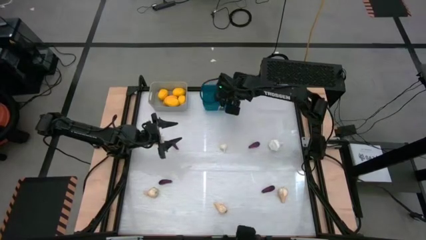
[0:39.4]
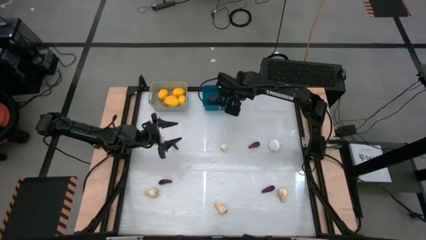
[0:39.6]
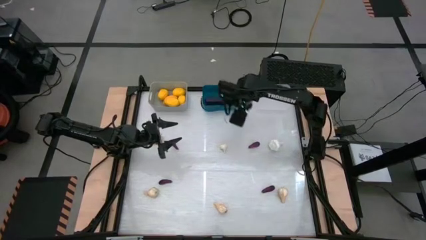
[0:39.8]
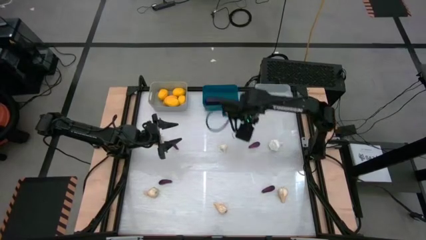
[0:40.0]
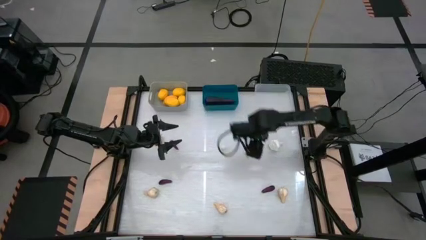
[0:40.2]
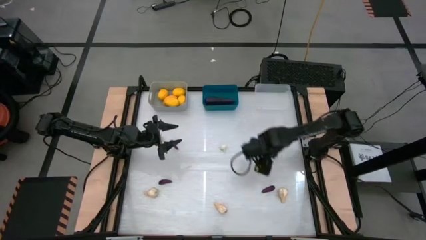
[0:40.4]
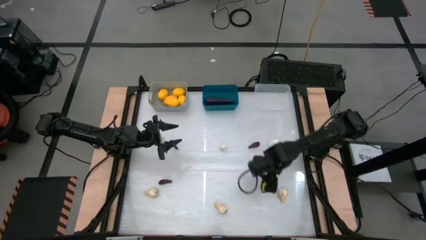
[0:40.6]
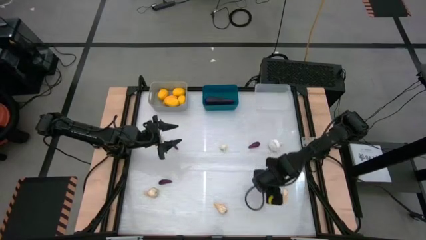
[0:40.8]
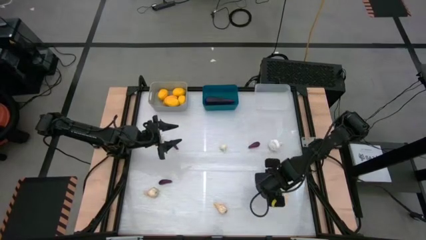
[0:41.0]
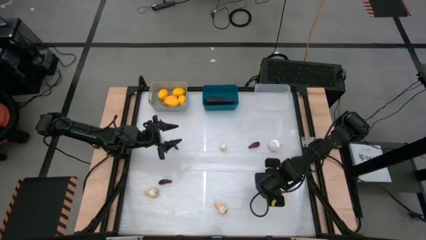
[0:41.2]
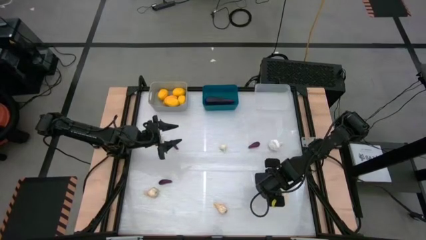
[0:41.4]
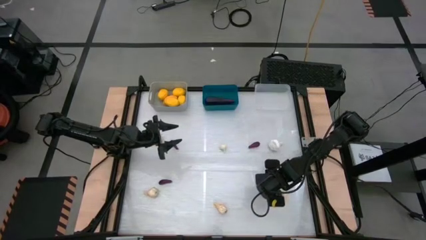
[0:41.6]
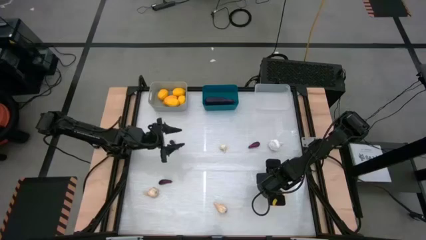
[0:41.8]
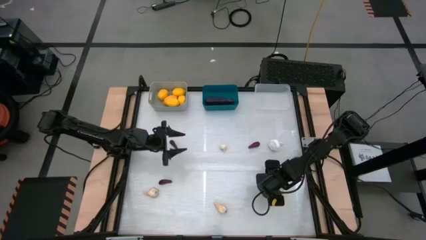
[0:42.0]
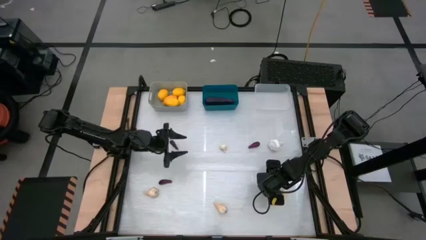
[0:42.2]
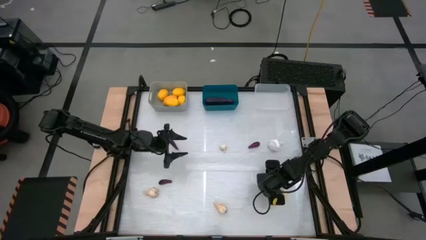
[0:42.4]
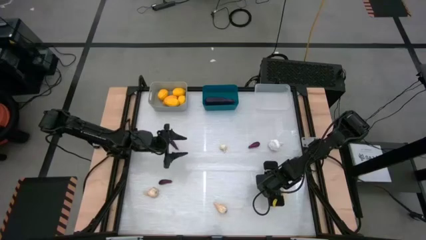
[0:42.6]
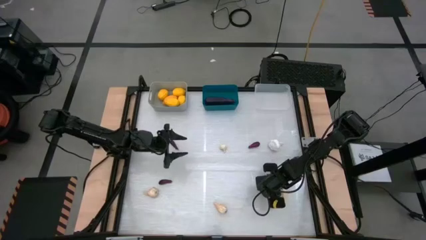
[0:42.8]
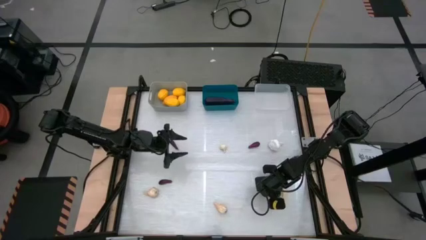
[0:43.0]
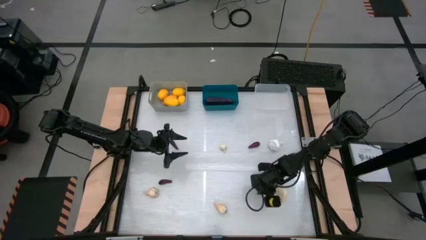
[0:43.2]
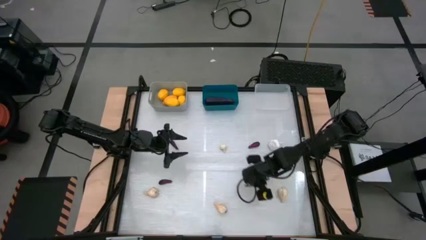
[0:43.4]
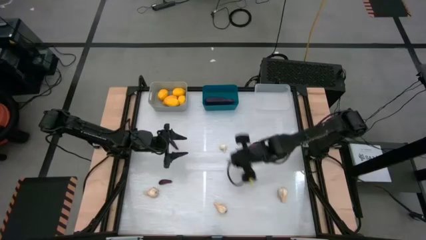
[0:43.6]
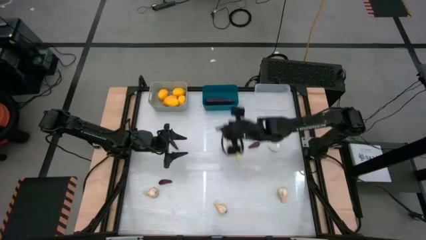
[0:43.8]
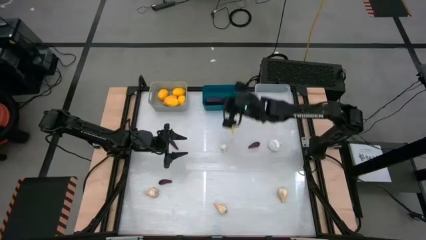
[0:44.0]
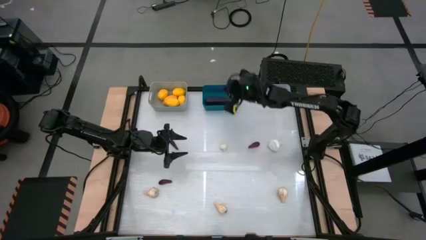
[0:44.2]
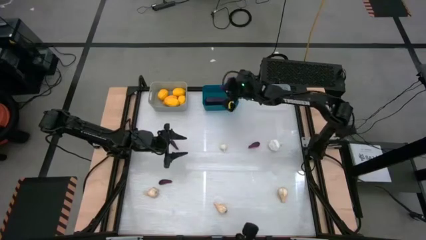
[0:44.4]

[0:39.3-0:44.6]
Task: Sort produce into baskets
Put the bottom right eggplant into the blue bin

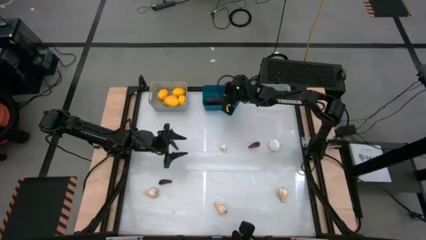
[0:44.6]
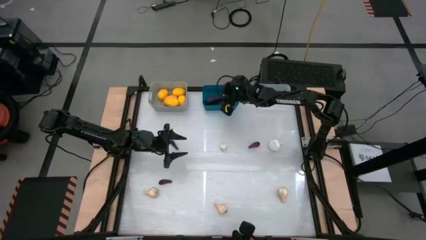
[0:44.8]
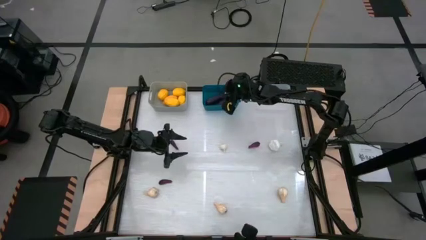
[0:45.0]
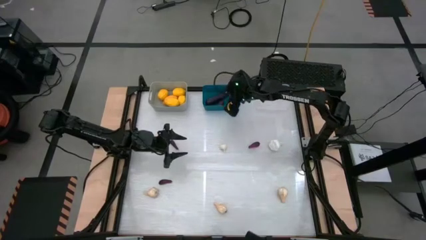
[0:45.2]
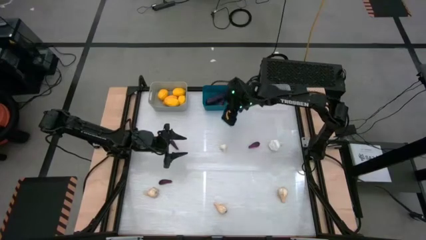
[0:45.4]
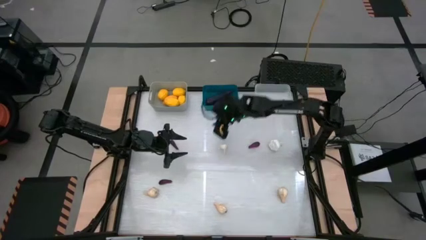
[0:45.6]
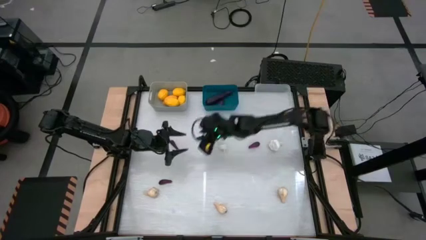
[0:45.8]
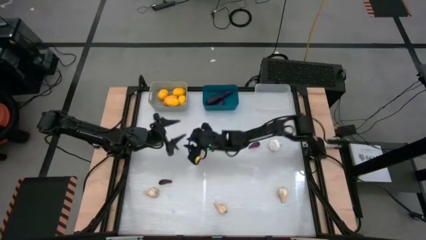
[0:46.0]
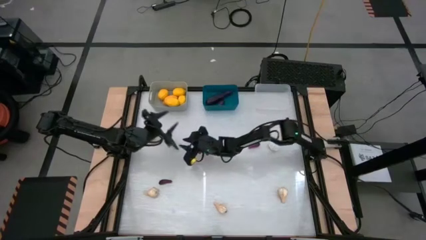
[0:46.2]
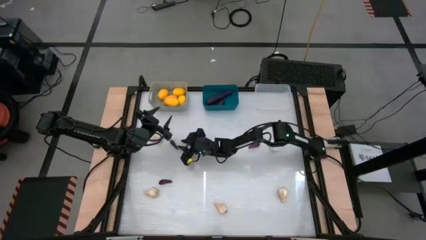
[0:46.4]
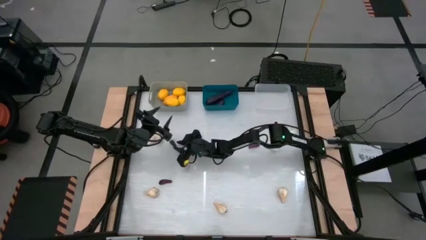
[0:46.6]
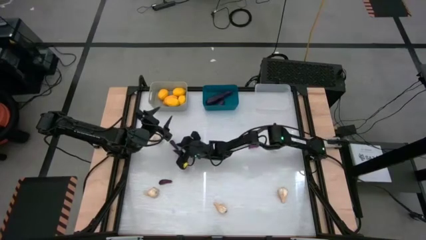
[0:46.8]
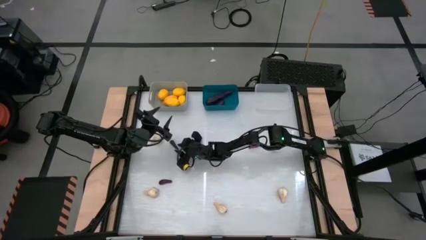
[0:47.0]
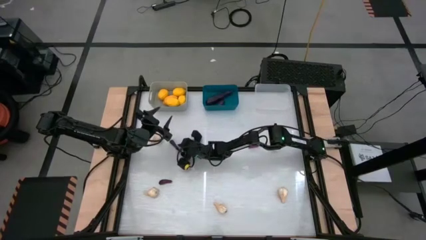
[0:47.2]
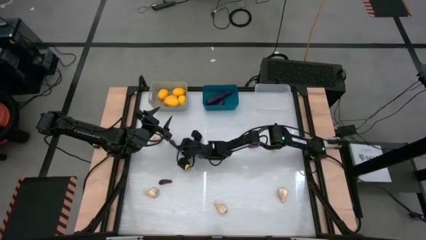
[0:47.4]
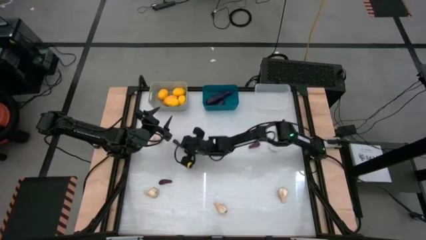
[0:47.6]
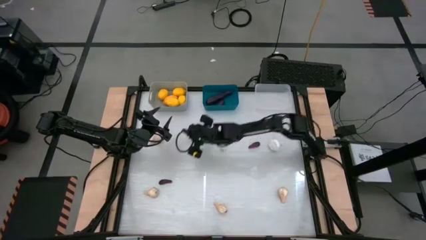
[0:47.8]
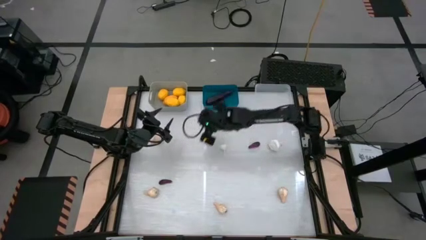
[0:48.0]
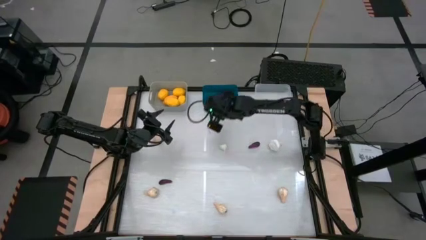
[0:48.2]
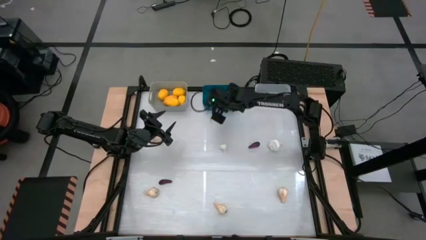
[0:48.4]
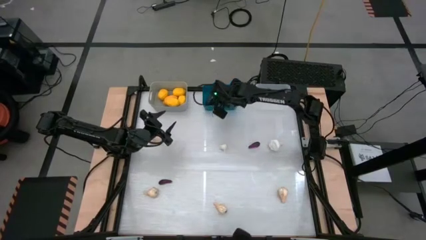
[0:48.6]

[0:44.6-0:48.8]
Put the top left eggplant into the blue bin

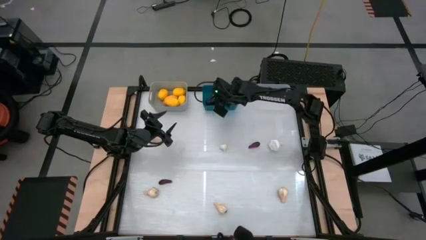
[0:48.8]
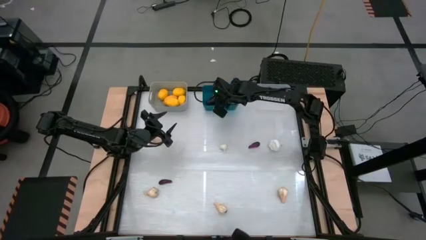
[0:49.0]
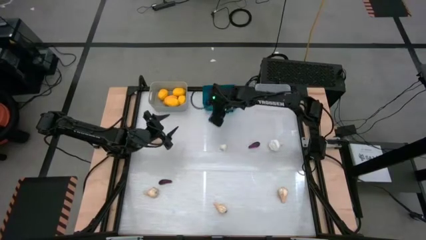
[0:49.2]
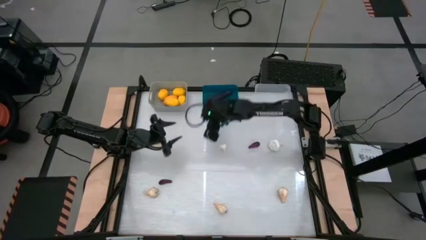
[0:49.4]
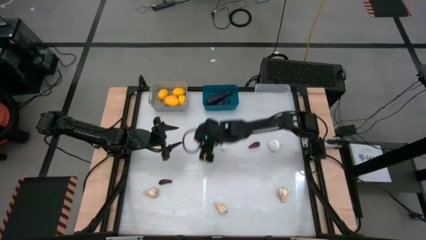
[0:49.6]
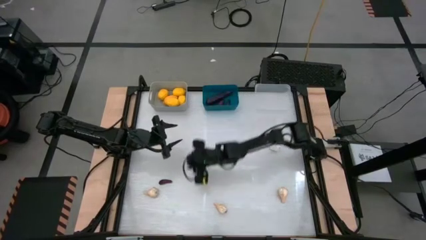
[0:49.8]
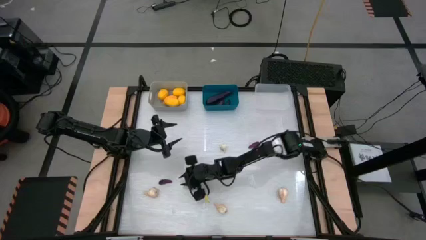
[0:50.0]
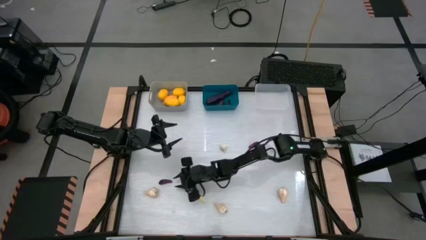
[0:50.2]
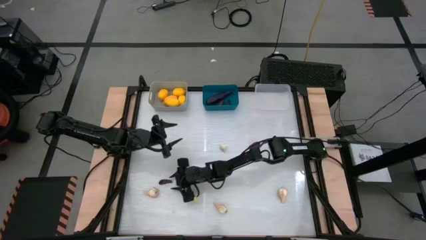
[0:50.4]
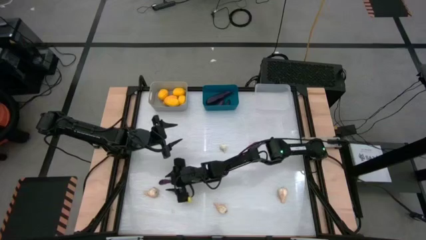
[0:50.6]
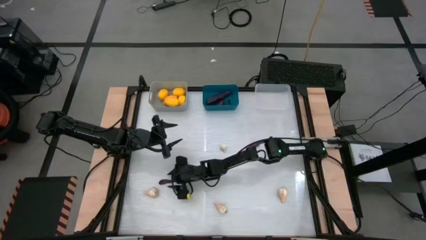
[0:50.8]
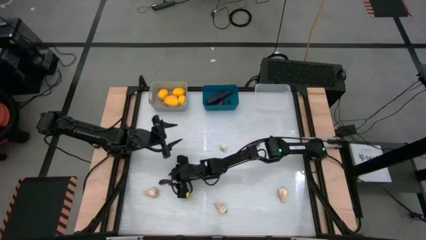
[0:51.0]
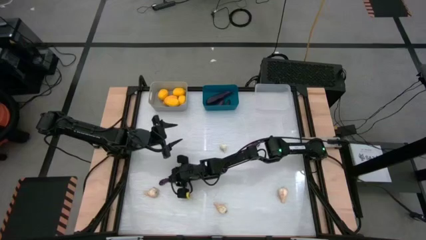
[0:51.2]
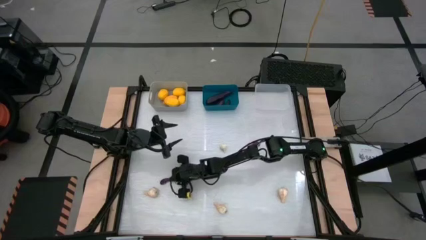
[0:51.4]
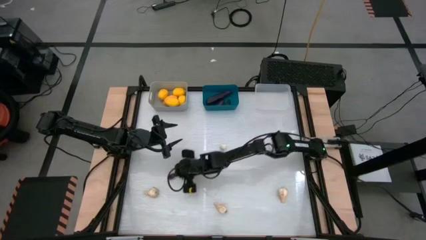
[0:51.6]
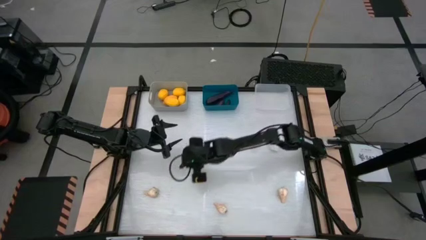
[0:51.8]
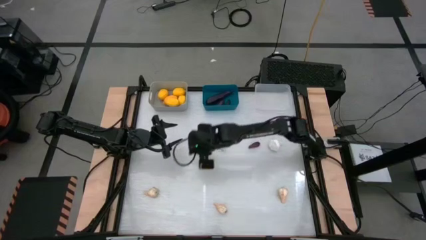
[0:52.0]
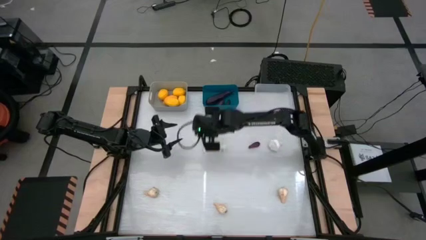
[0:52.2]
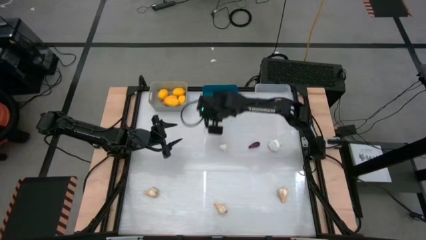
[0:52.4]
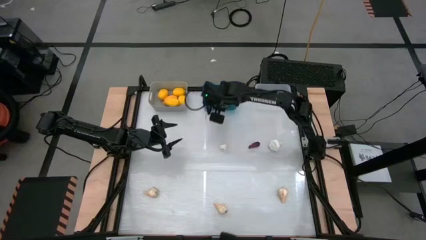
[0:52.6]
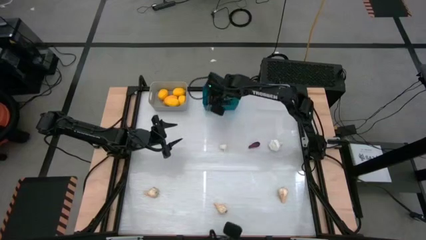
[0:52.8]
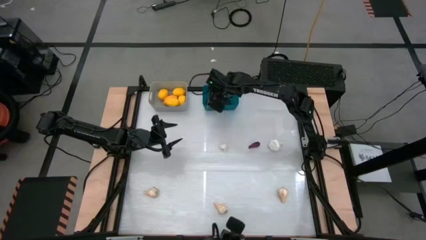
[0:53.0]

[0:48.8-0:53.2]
Put the left eggplant into the blue bin

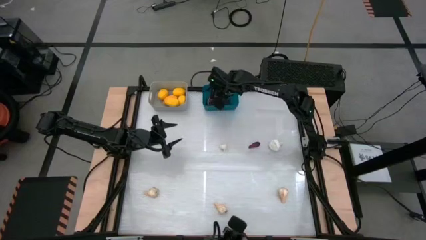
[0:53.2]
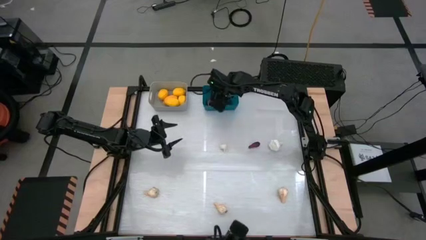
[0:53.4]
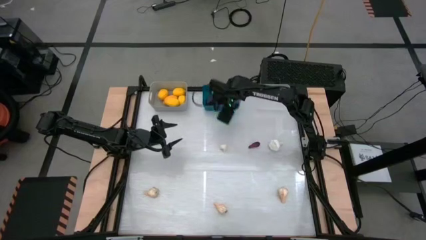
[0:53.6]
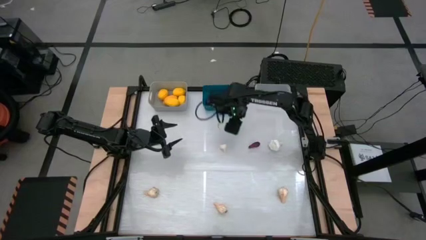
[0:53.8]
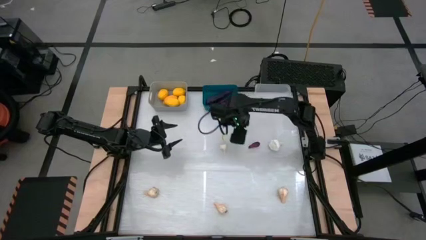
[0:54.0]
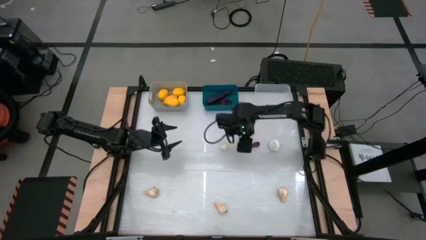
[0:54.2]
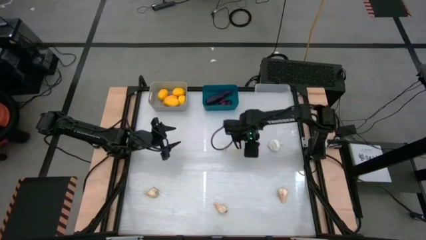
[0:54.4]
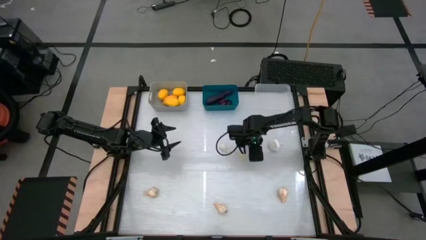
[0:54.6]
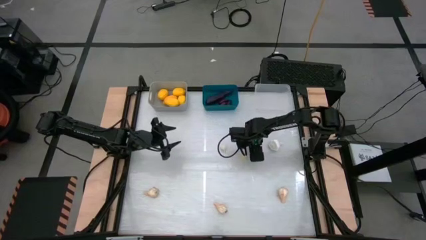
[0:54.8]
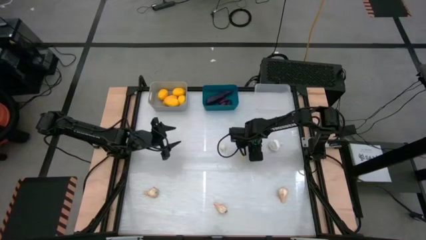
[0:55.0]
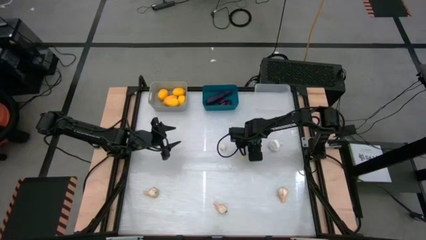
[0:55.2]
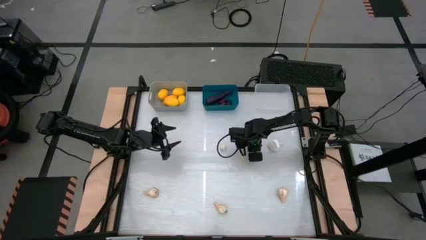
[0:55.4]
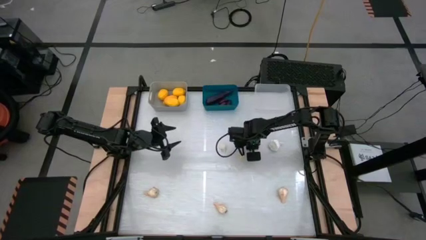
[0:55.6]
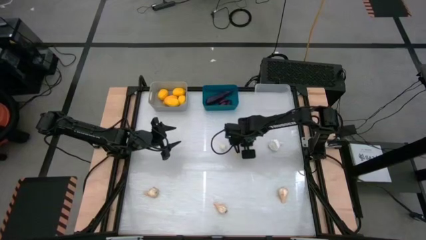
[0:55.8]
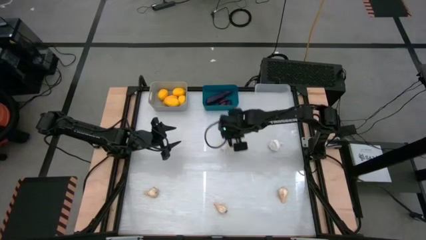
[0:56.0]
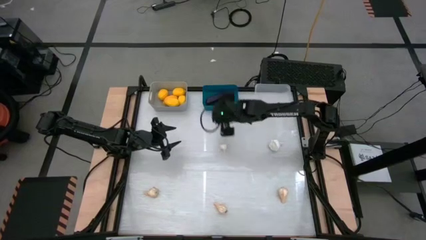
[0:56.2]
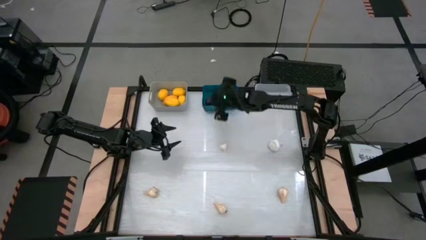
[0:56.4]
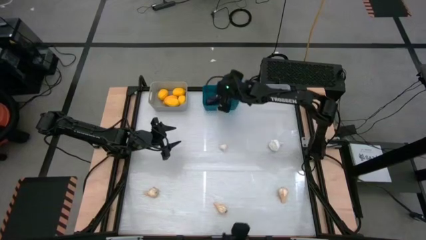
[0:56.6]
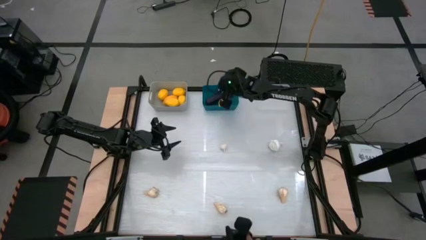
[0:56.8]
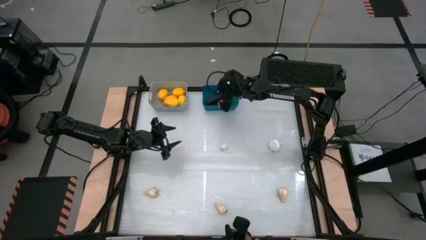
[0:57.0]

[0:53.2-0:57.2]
Put the eggplant into the blue bin
